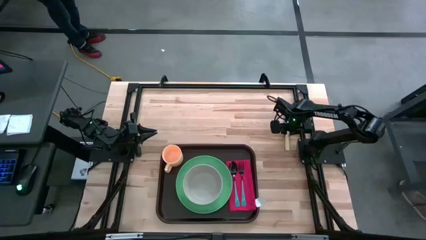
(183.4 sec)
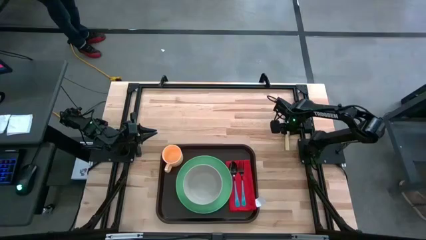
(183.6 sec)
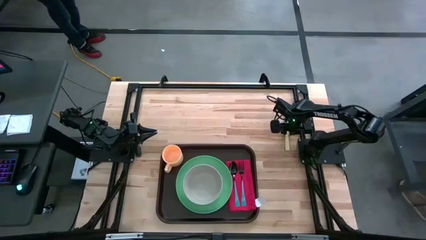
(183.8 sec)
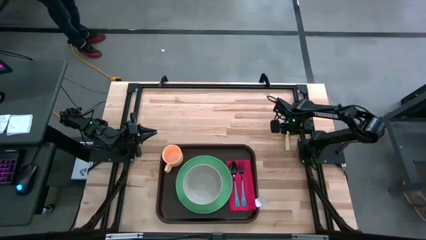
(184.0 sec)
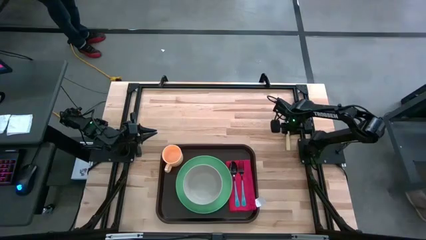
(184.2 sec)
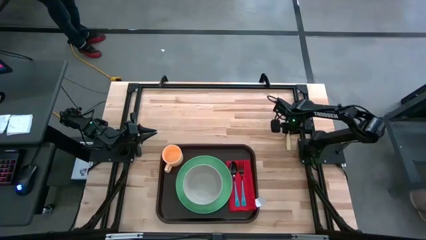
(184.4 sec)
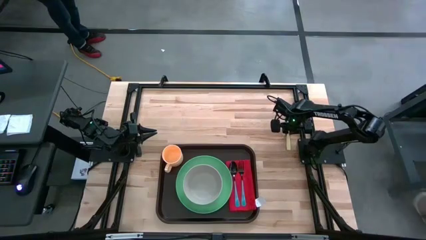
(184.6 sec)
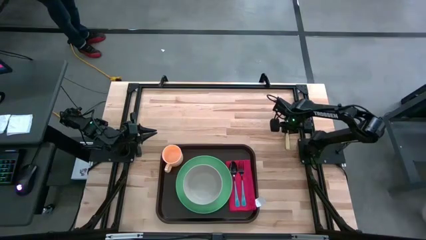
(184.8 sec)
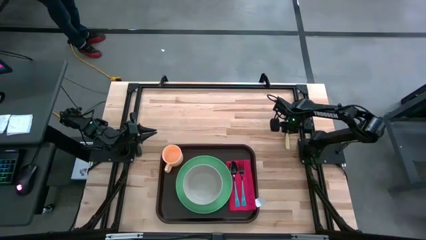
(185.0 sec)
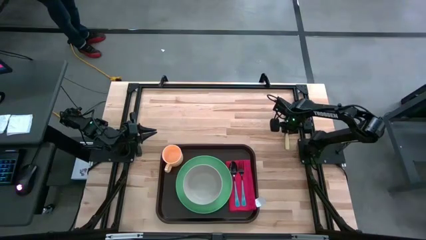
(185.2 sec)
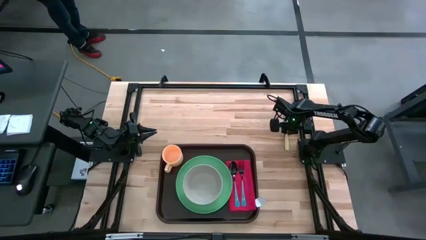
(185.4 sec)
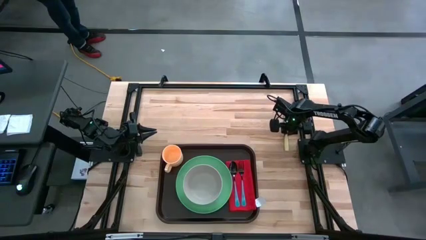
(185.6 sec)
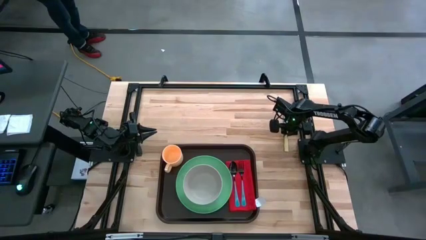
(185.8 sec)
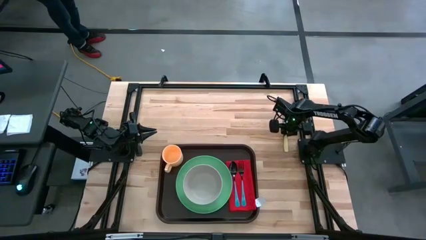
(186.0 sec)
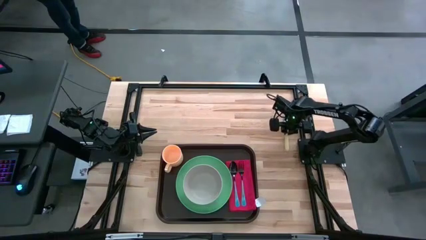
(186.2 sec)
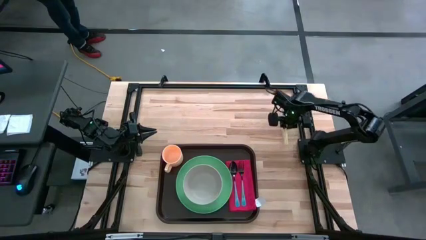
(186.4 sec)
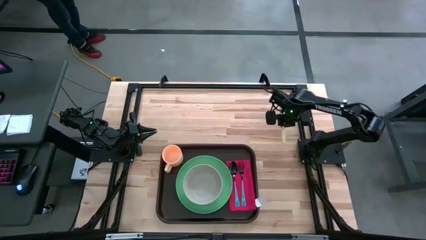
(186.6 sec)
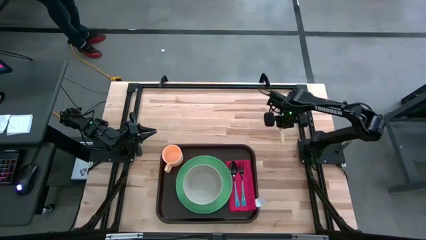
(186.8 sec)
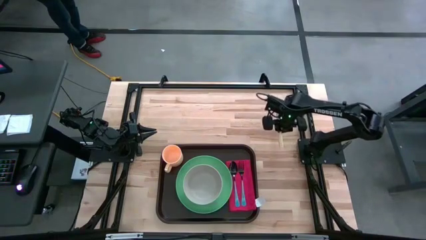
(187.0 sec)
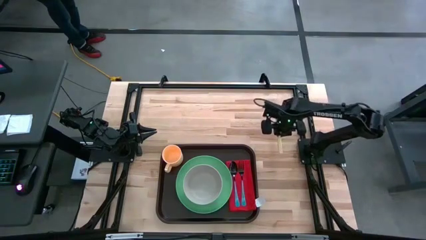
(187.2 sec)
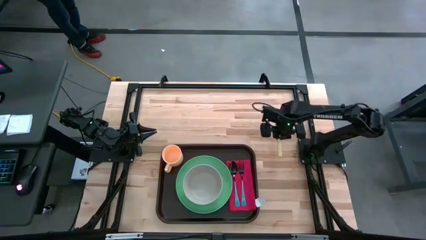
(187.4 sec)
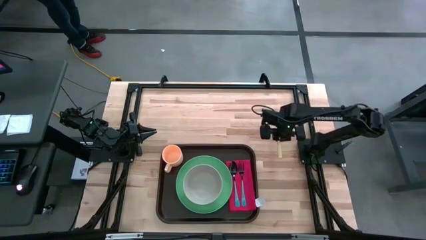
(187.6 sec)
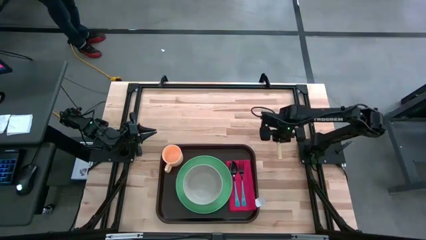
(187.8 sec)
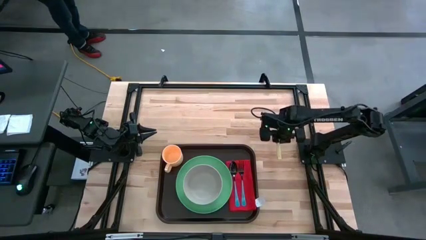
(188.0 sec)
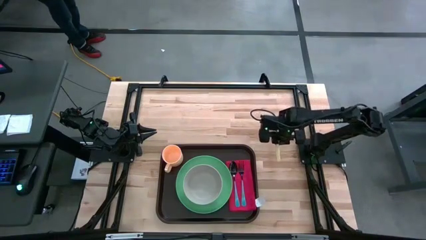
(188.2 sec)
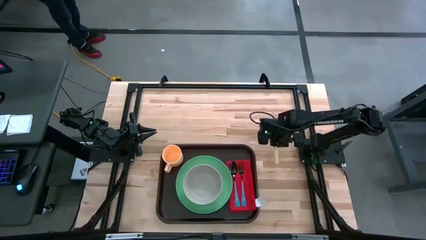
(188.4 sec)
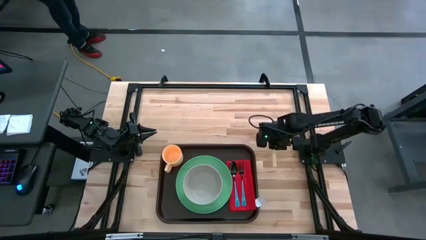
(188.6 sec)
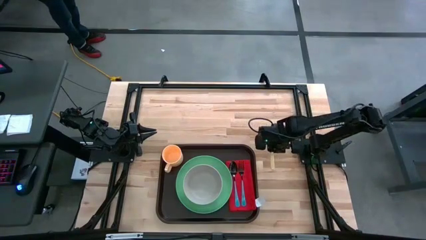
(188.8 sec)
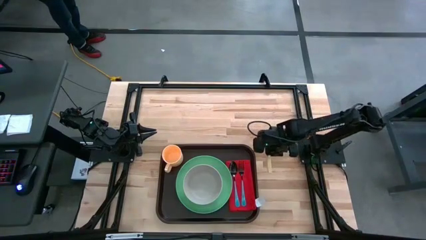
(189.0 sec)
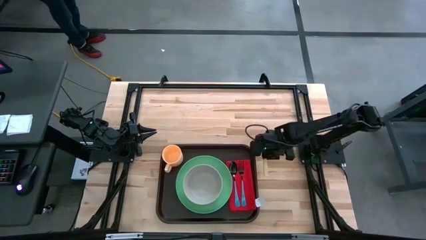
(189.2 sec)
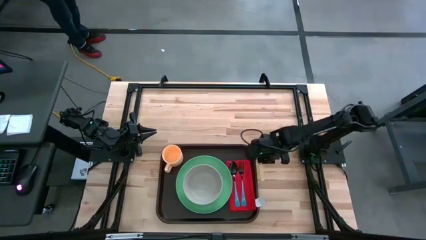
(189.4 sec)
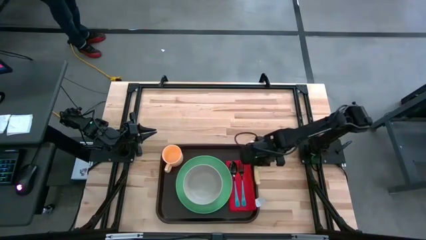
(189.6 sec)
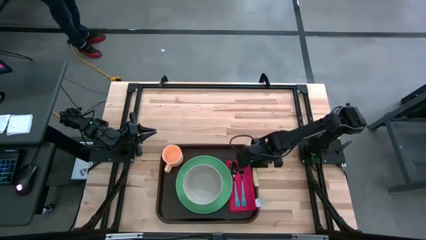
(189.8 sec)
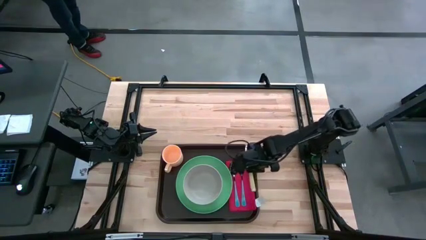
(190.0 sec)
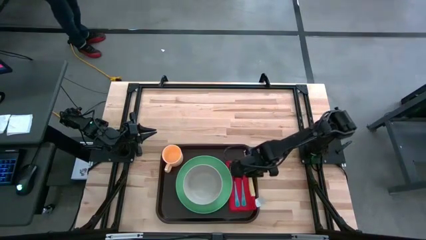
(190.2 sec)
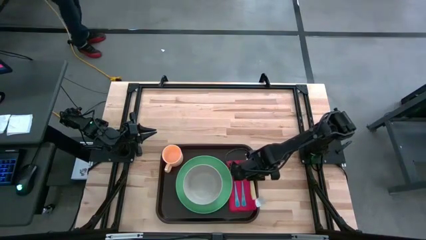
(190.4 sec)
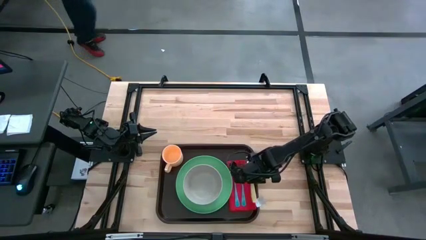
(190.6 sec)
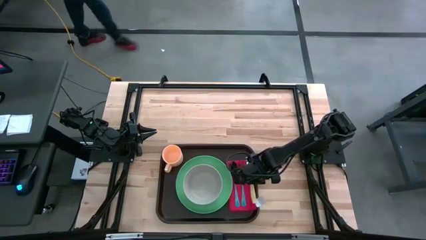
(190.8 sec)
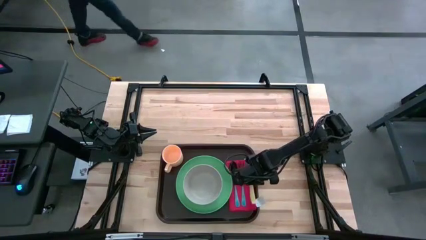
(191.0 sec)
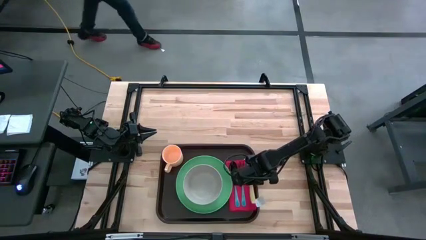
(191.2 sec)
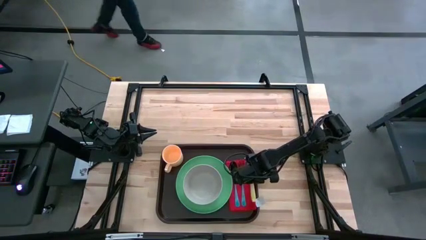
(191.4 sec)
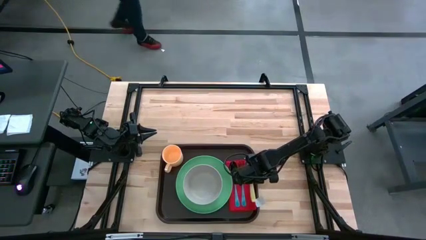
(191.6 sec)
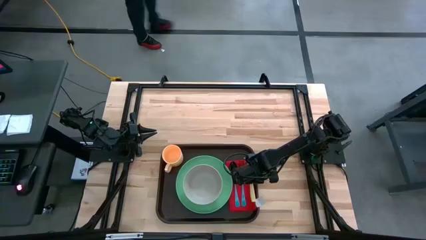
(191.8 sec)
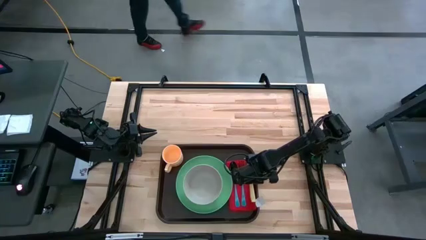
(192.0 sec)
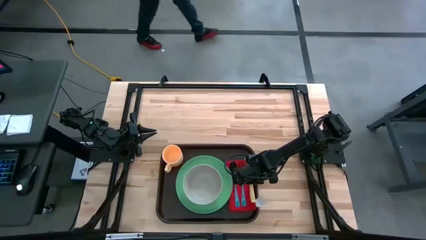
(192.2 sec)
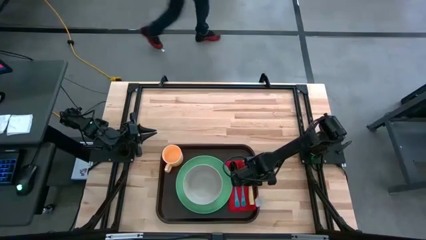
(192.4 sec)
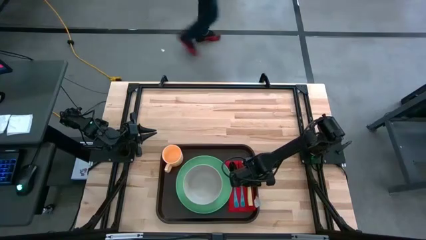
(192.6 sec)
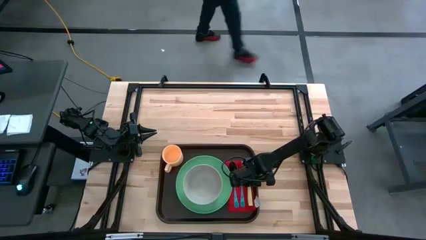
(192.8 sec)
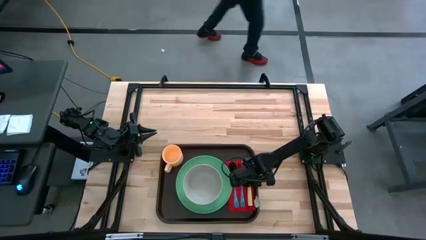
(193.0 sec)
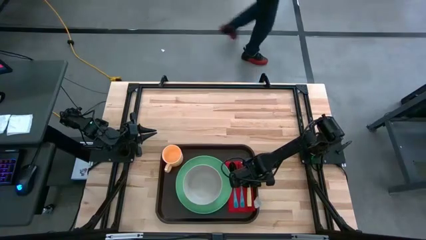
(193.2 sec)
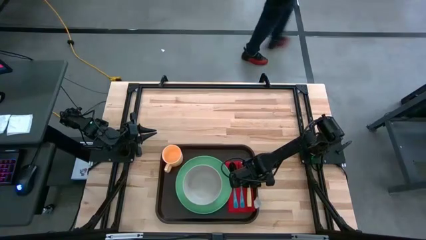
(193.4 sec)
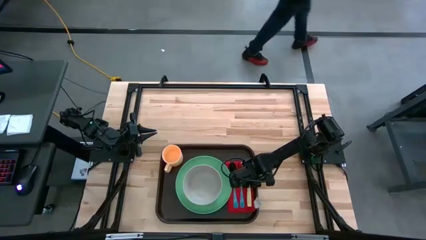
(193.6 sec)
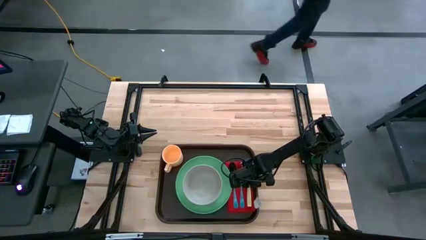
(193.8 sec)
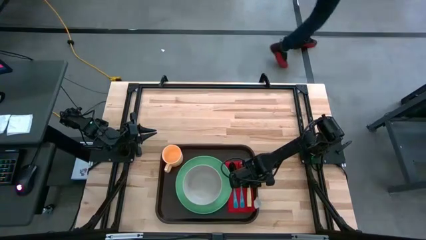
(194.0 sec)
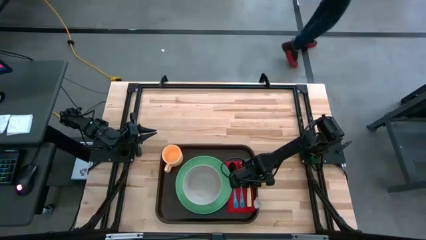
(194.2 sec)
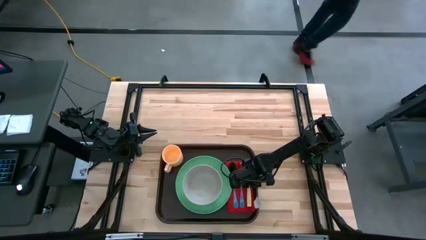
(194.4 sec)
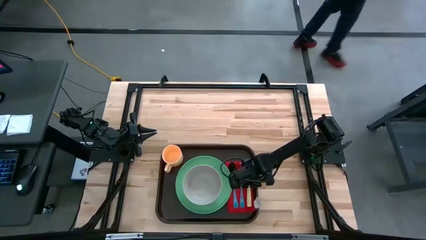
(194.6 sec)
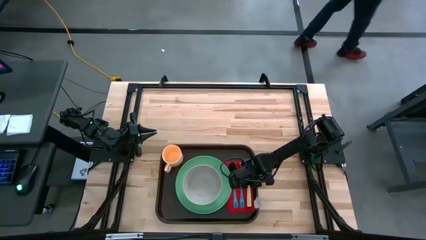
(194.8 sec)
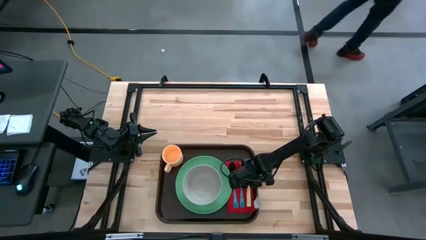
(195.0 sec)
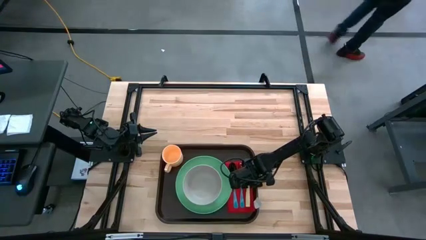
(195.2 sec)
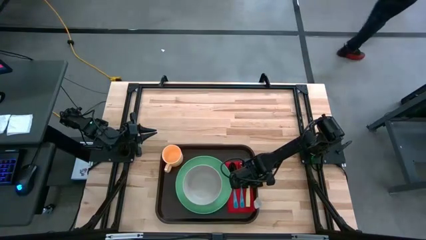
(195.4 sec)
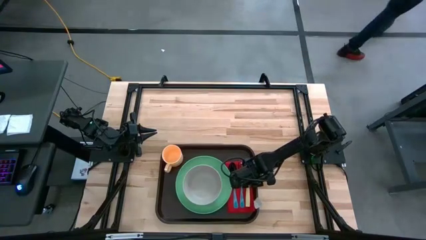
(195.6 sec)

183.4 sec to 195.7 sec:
Task: Set up tray
Put the table knife on the table napkin to the right of the fork on the serving tray

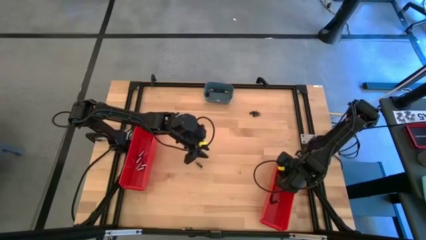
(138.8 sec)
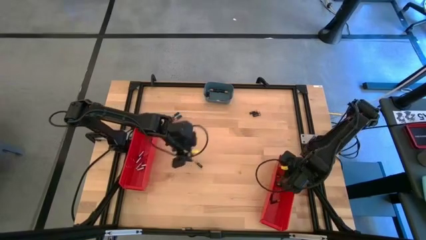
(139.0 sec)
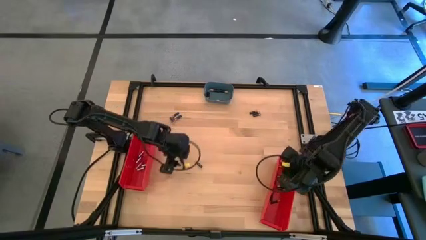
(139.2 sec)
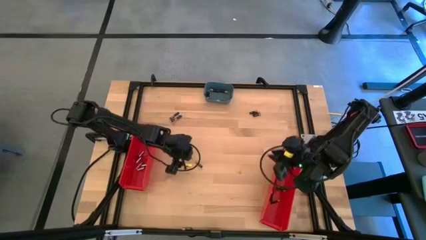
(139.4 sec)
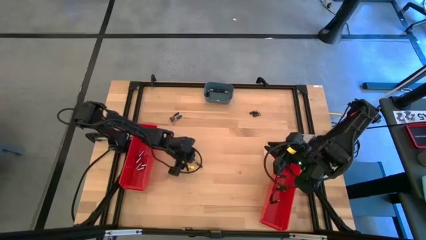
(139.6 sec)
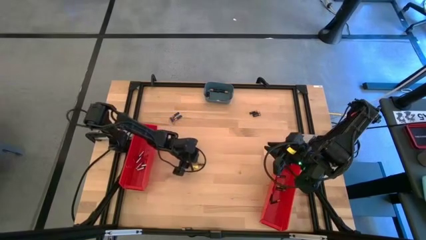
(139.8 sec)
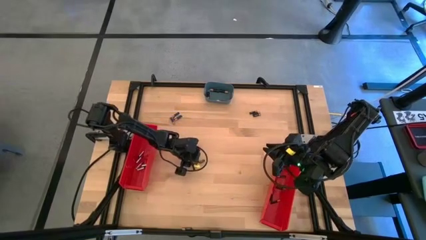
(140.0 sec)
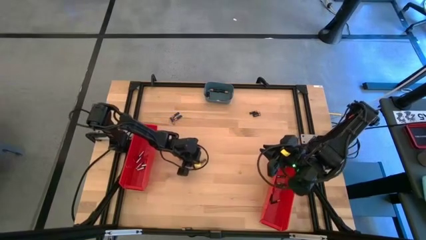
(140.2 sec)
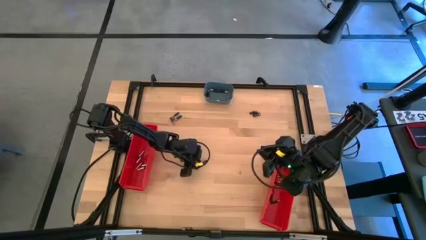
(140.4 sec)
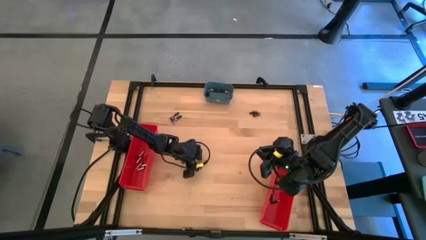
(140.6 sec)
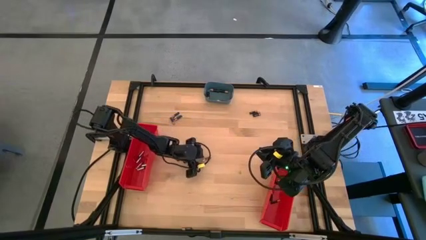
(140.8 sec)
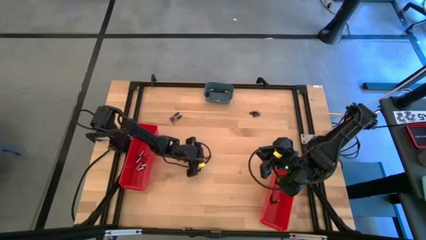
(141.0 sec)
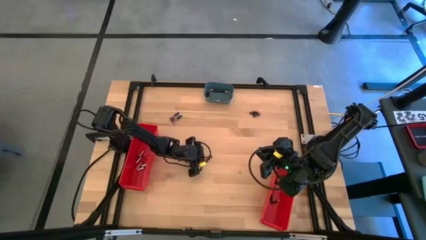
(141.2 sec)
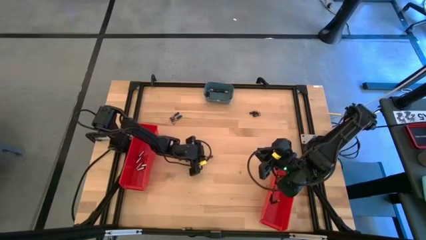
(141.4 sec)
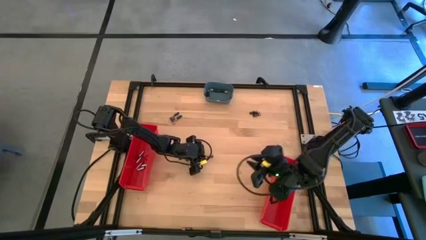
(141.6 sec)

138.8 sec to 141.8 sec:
Task: Sort batteries
Put the small brown battery into the right red bin
